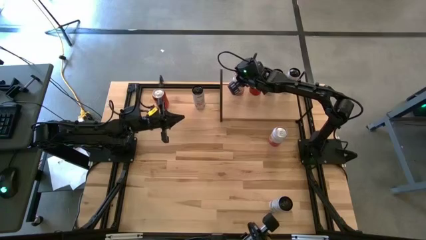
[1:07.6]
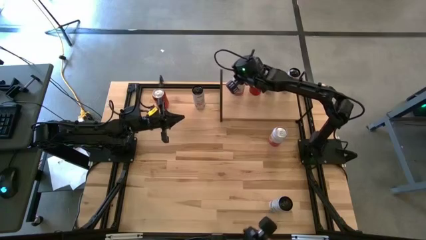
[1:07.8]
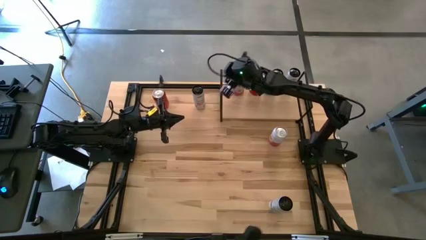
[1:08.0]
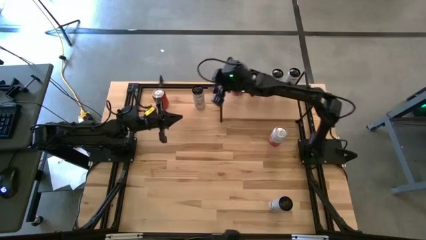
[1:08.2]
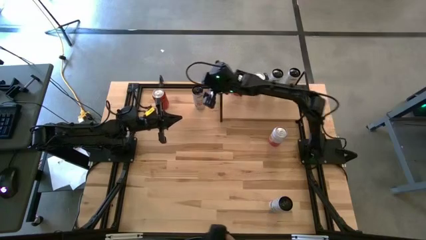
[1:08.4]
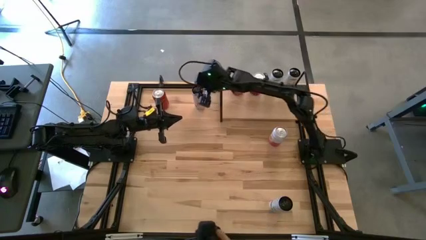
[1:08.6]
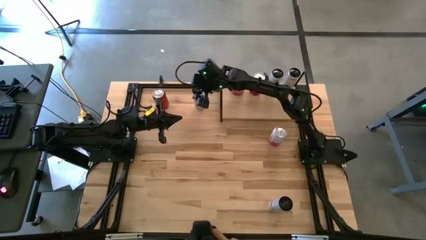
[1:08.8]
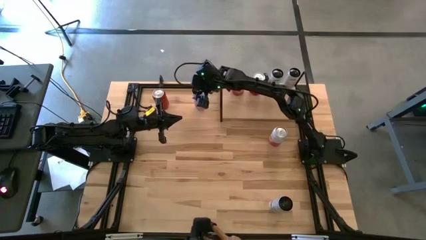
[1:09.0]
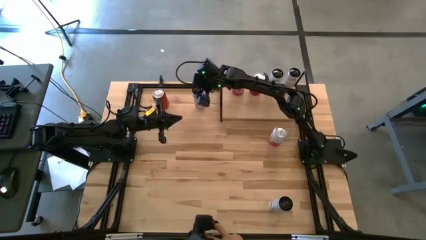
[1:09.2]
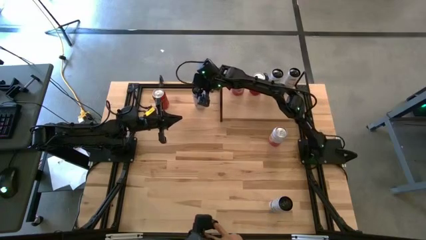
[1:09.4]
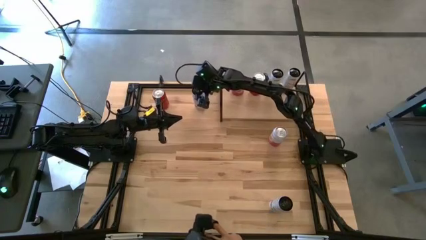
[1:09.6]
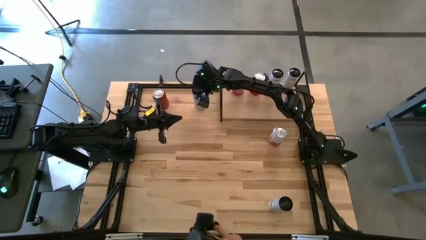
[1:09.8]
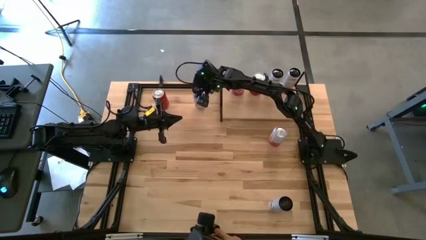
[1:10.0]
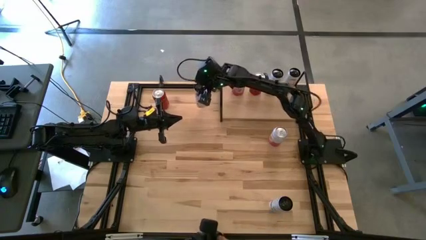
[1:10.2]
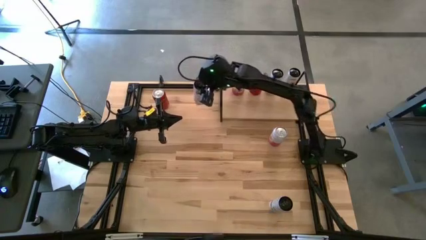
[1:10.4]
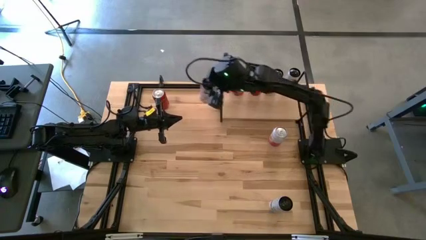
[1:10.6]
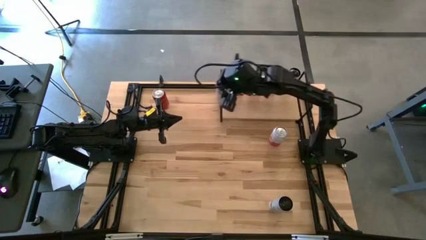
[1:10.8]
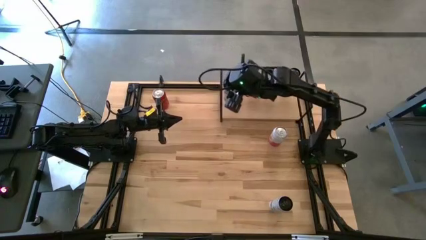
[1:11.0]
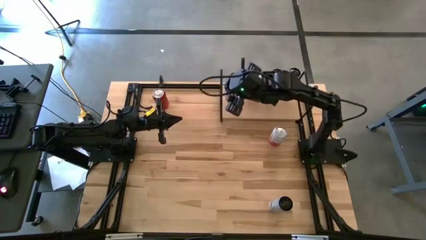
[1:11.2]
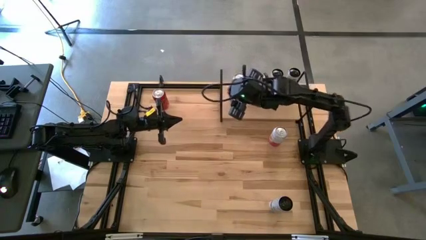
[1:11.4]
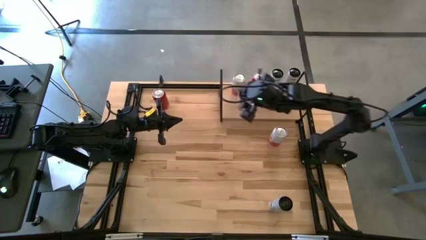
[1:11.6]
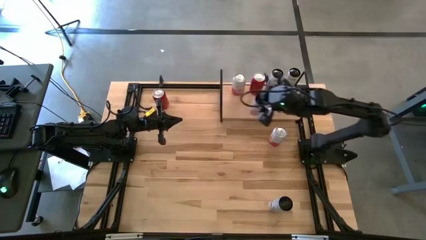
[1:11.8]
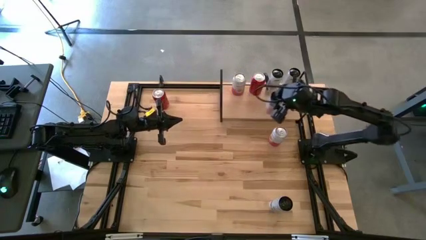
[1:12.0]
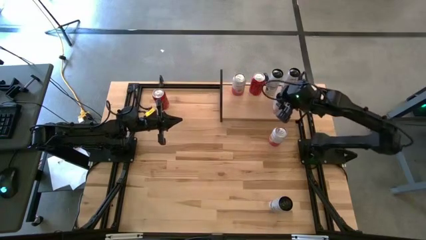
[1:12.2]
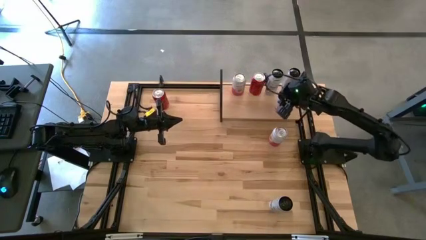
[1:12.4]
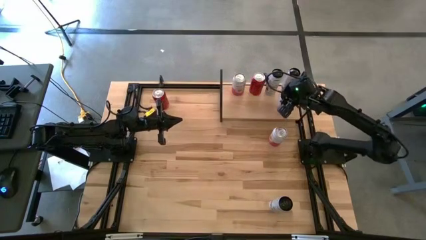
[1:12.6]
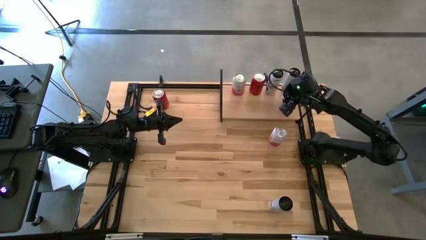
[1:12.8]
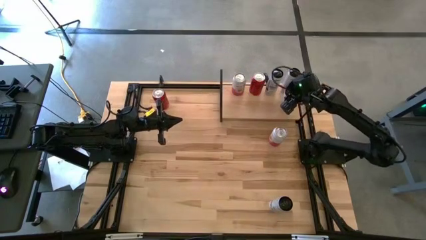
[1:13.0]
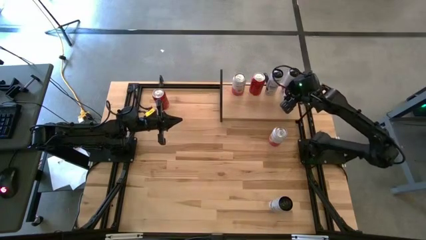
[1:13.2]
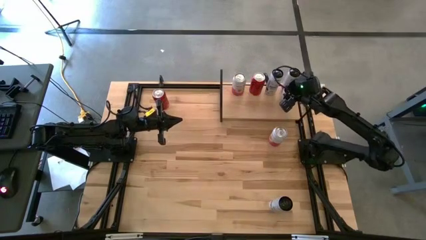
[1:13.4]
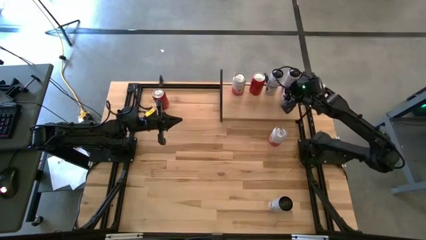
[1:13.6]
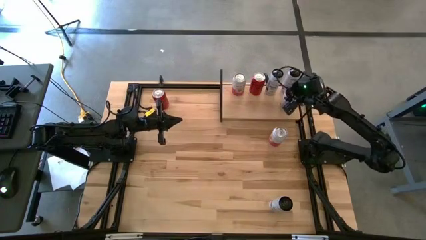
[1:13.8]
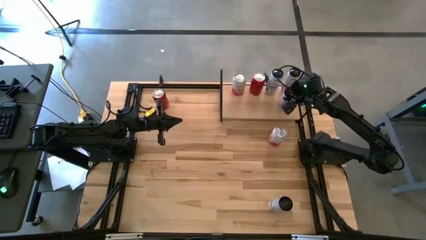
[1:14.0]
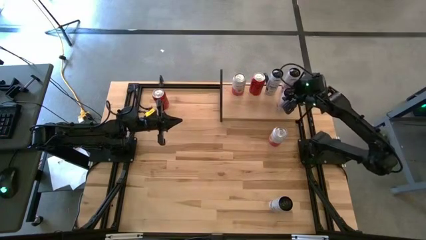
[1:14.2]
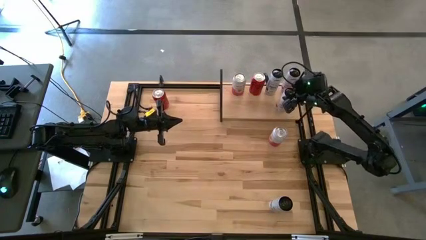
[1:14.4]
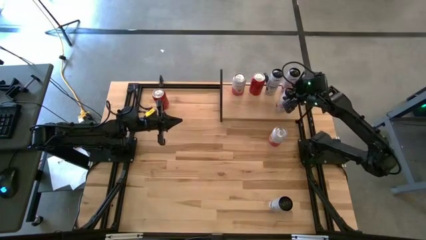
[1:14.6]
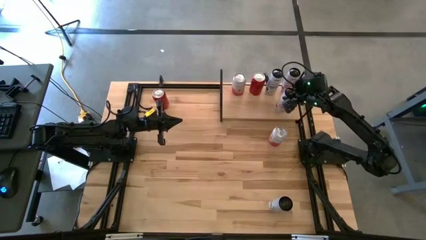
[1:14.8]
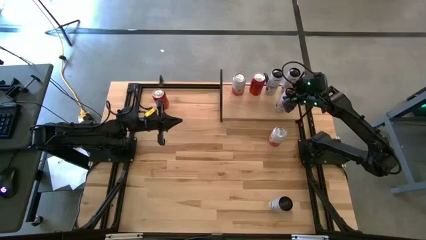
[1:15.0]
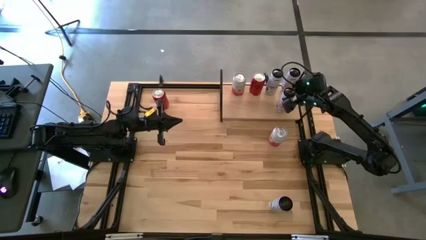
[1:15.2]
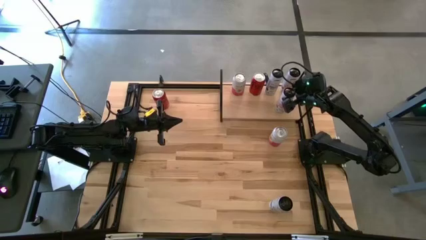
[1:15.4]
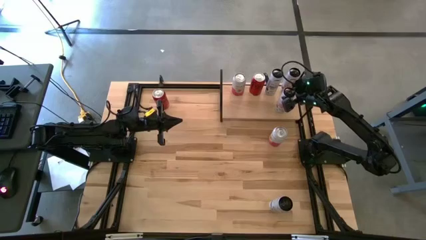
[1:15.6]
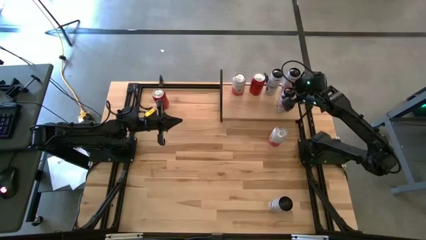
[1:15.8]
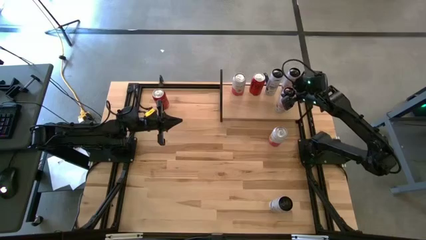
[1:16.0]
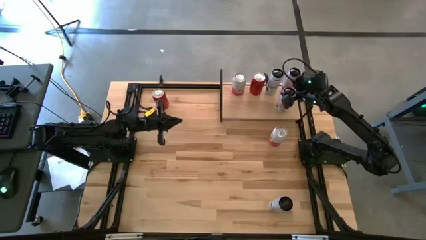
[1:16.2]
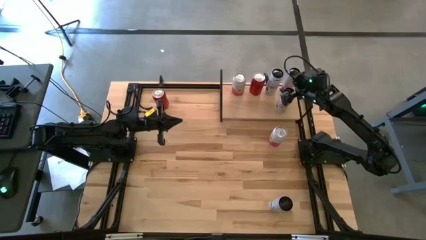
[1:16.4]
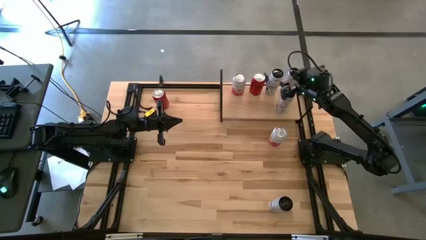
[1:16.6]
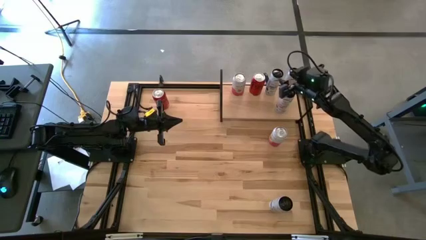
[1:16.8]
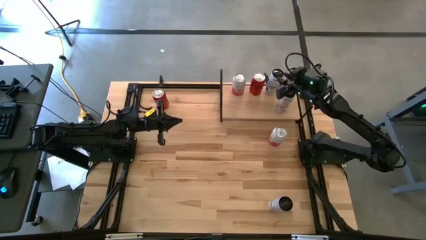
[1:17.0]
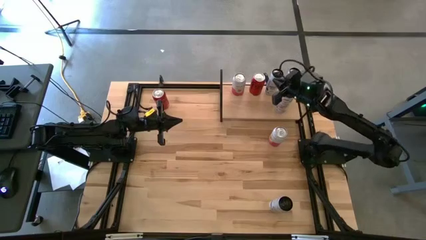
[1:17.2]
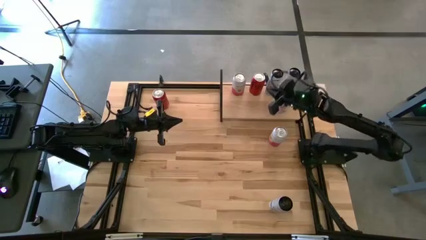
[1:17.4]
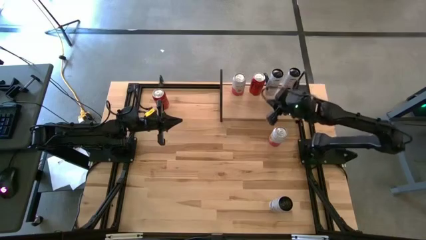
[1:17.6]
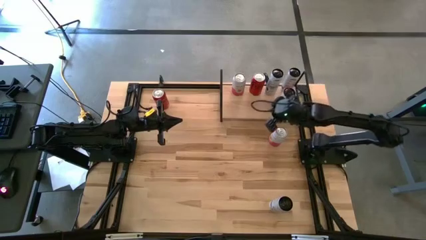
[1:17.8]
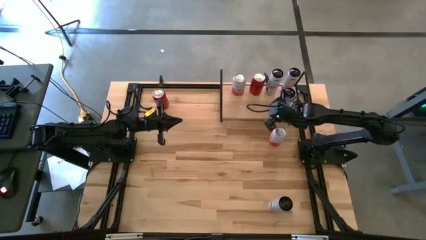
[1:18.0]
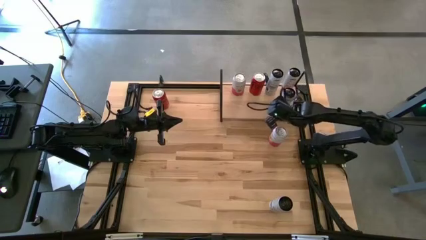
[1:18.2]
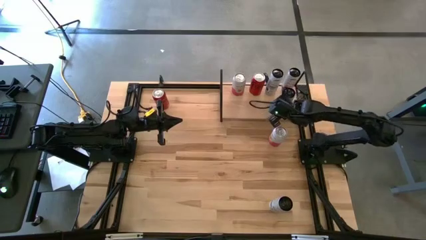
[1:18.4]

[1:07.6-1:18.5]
Task: Place canned beverage on shelf
Put the white and pink soda can on the shelf aligned with the other white and pink soda can

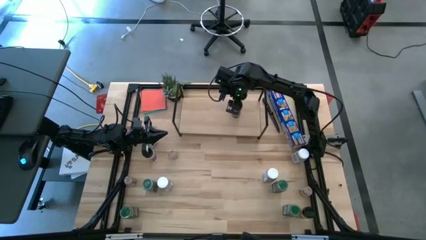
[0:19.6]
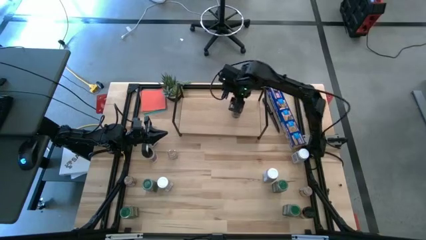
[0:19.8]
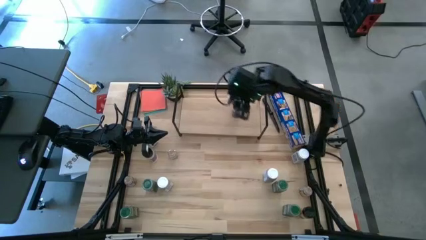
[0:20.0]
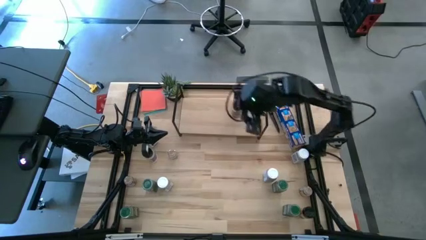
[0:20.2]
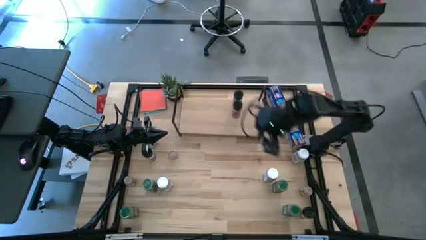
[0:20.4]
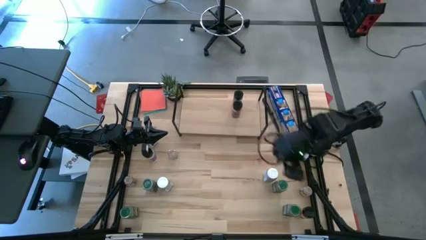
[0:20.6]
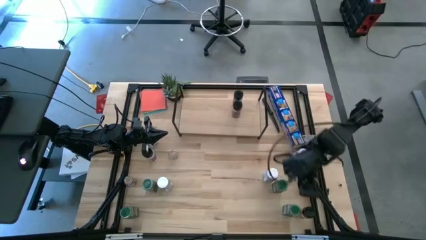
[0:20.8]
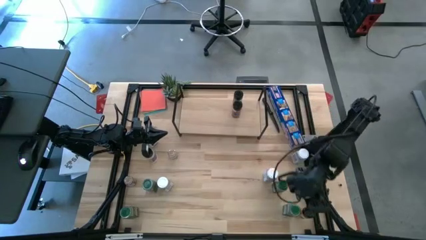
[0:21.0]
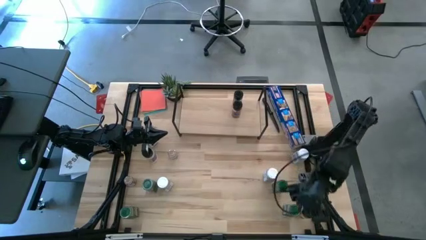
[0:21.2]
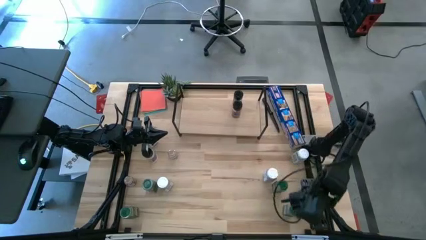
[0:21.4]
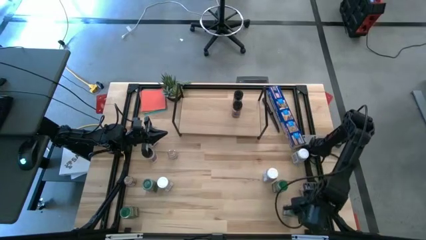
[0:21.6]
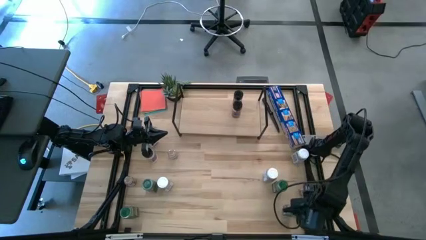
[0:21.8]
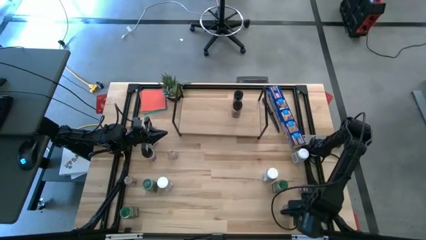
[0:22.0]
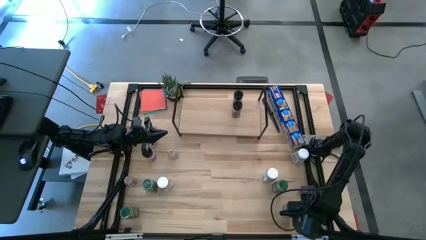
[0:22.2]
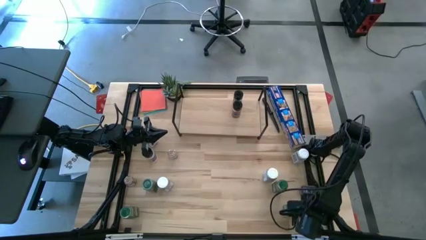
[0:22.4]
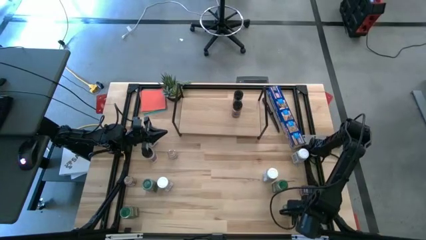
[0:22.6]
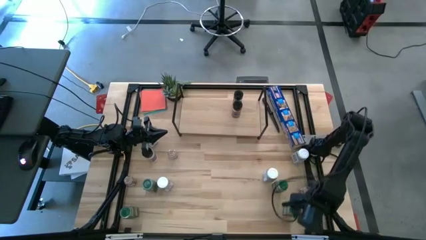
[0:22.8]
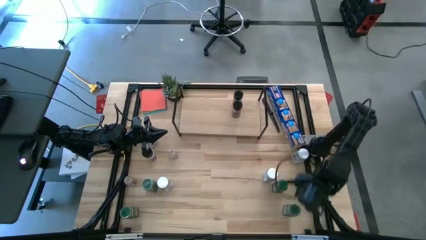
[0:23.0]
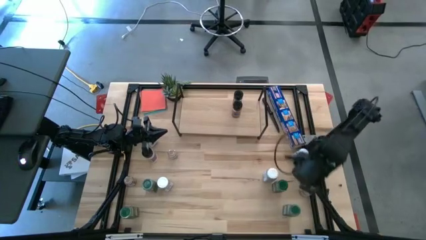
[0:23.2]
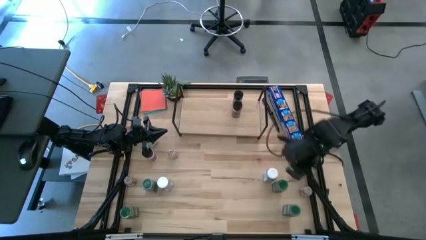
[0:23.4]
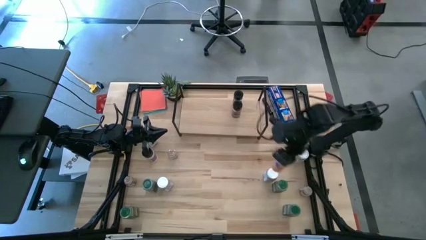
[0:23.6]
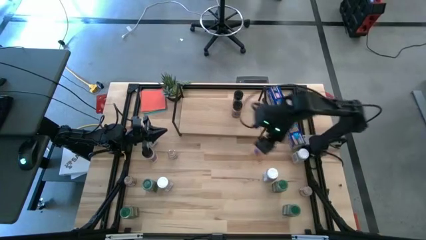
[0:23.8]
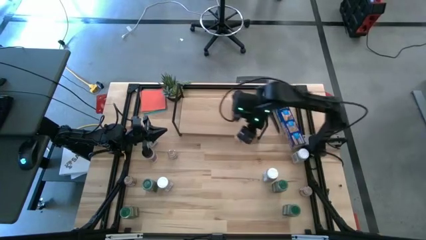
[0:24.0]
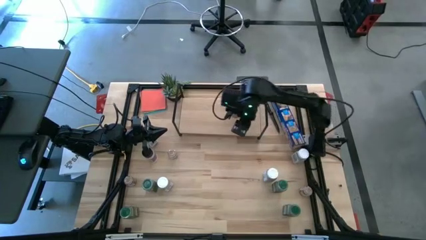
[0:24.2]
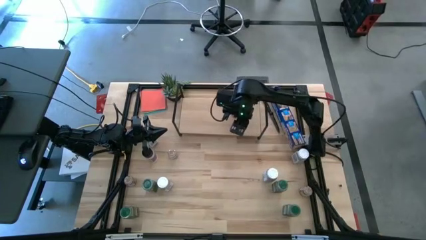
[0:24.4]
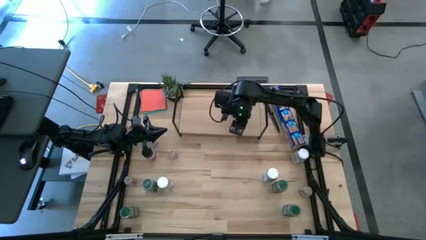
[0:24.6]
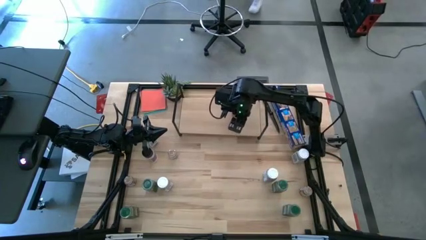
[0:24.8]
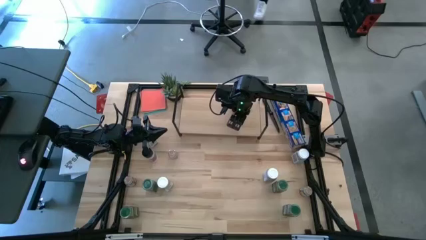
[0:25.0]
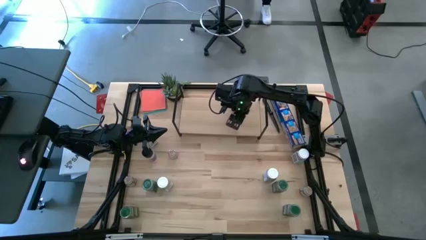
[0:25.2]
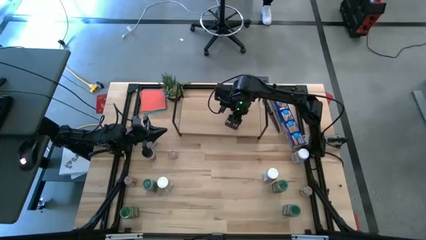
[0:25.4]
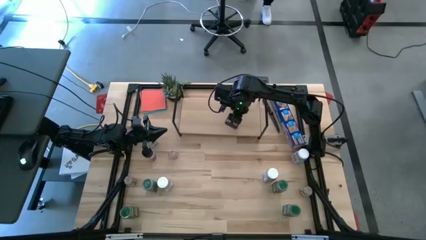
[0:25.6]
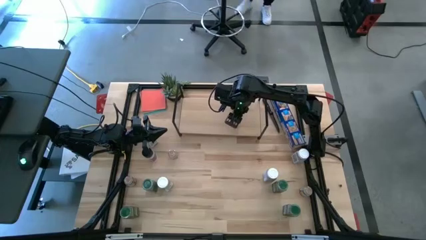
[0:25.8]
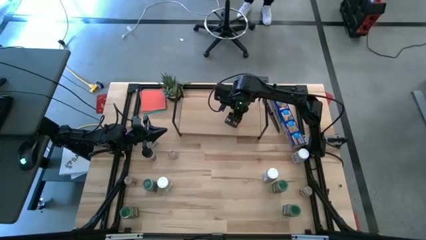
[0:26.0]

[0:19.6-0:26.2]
Task: Shelf spices
Put the black seasoning bottle on the shelf aligned with the other black seasoning bottles
